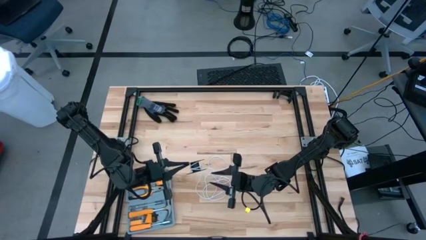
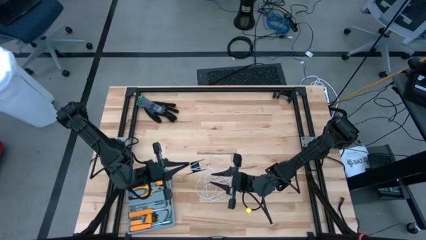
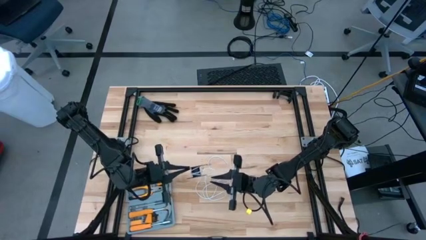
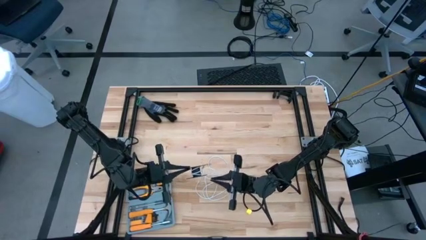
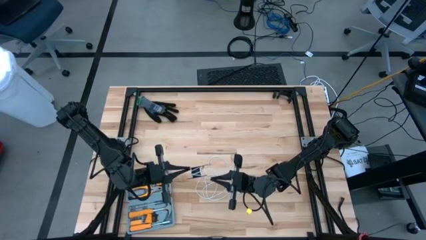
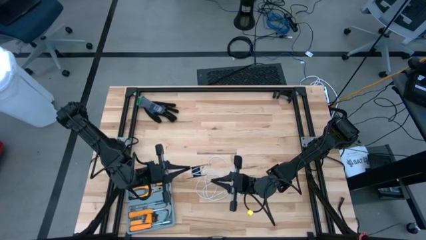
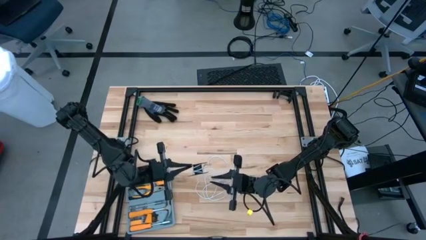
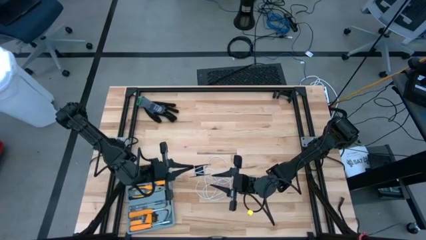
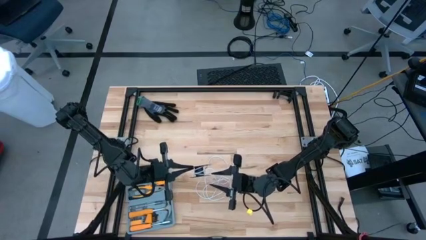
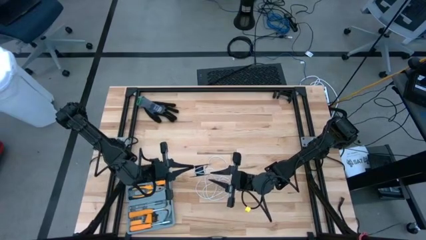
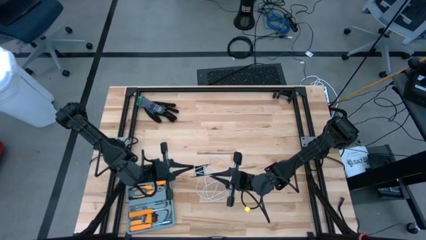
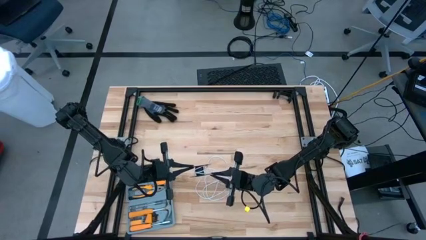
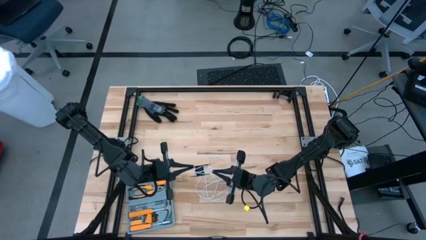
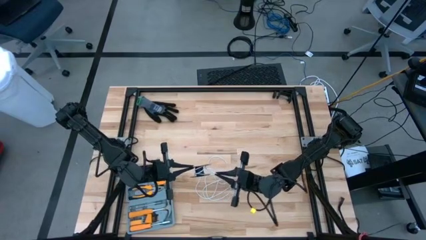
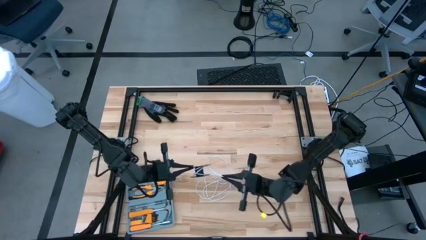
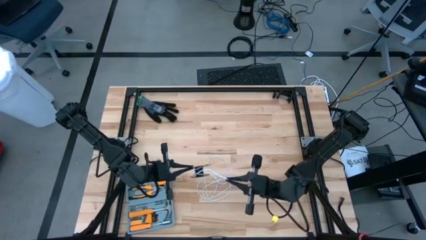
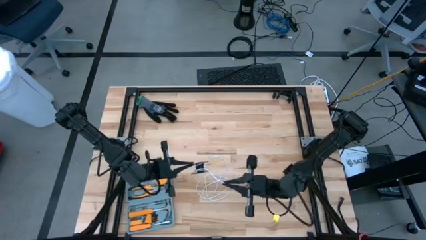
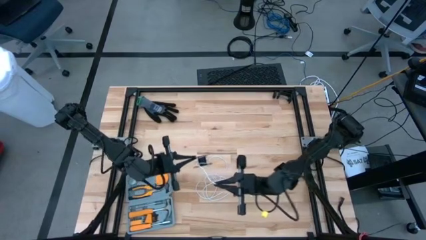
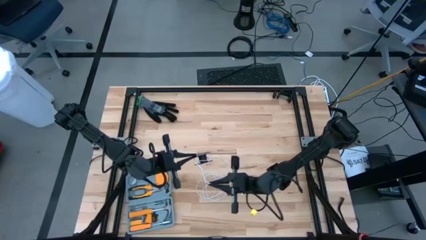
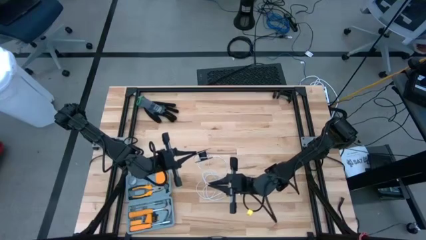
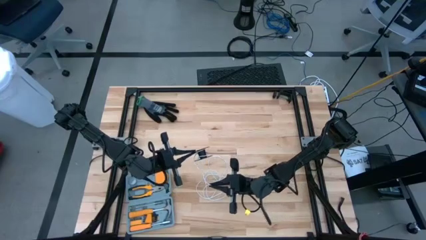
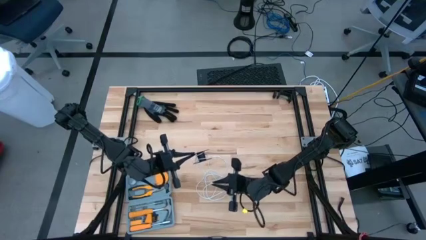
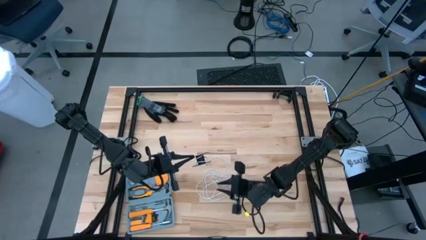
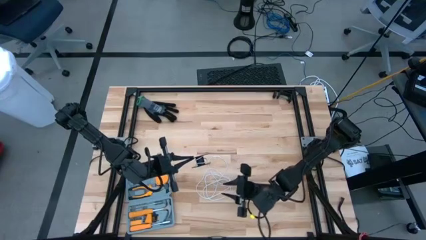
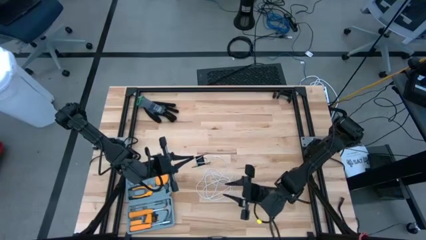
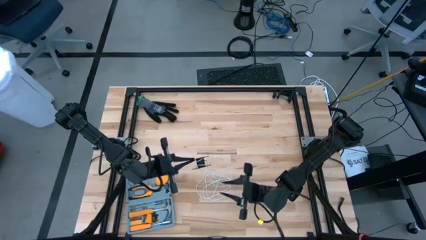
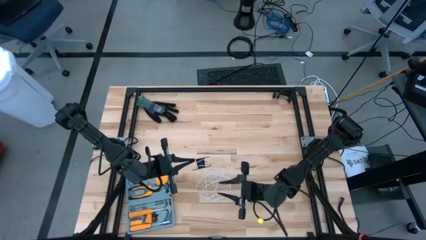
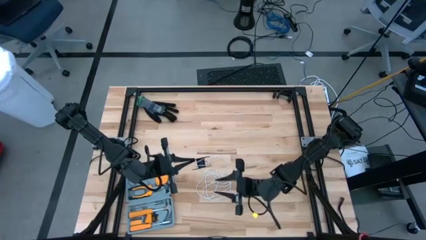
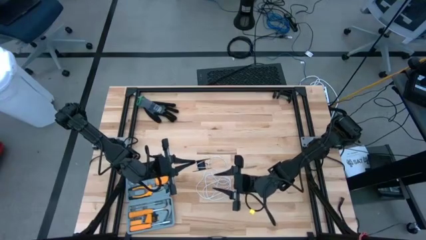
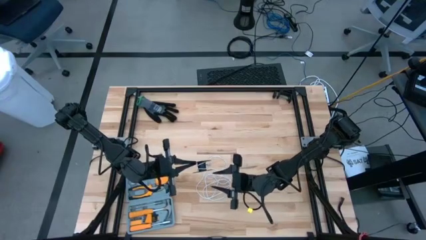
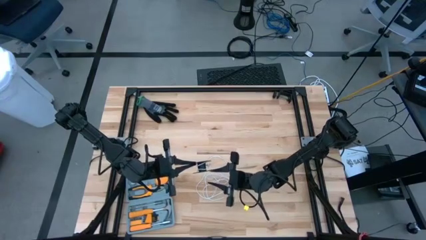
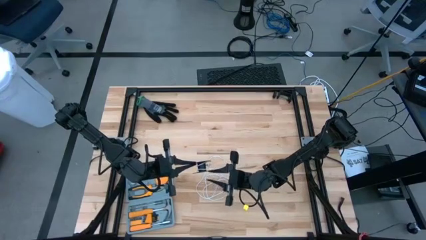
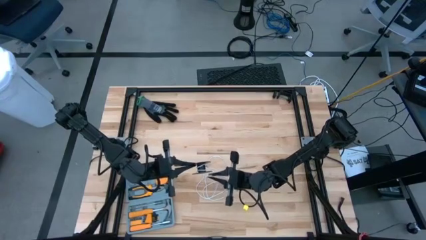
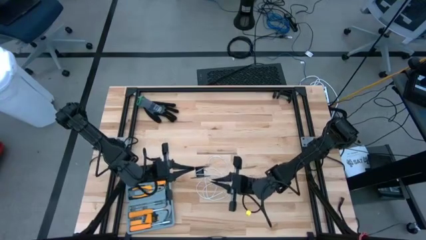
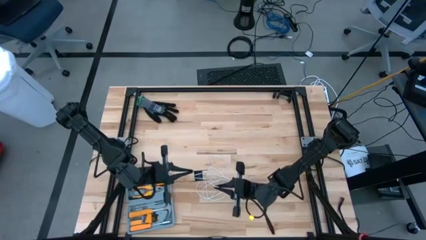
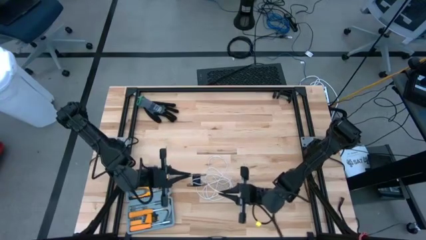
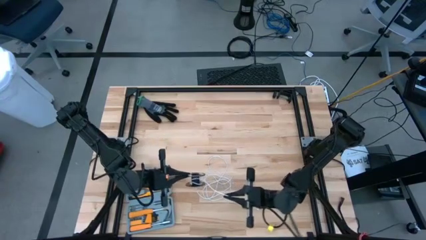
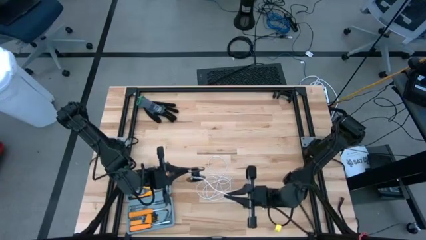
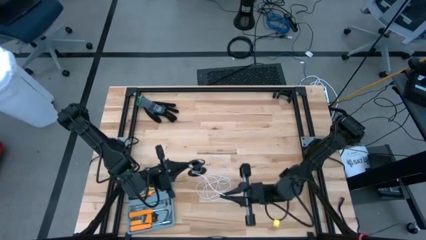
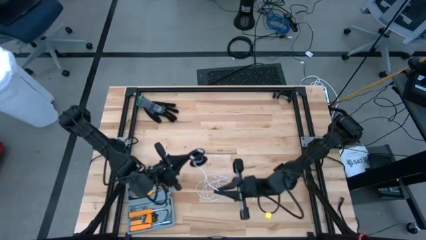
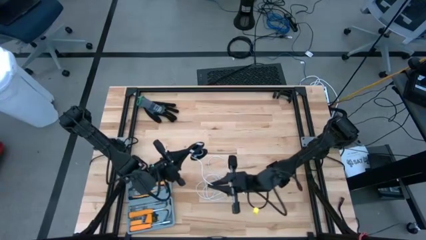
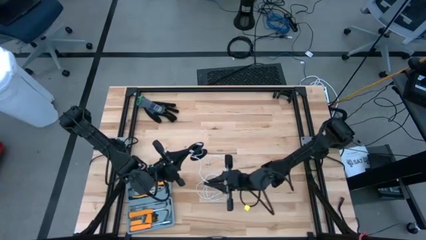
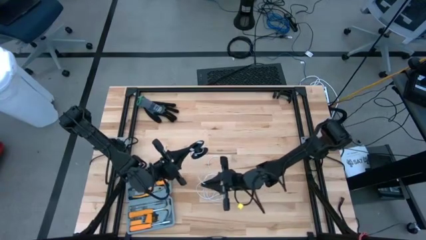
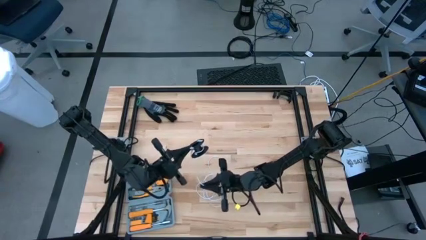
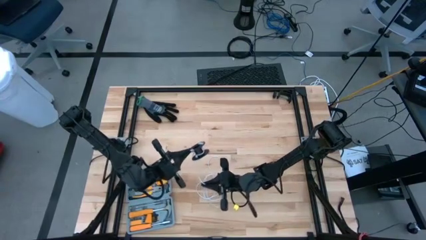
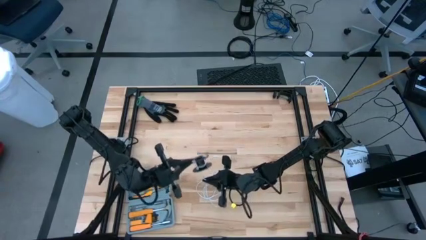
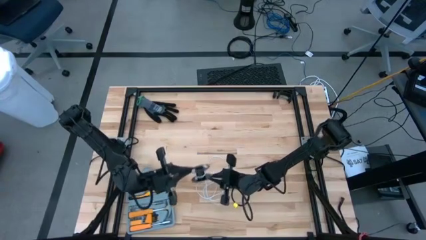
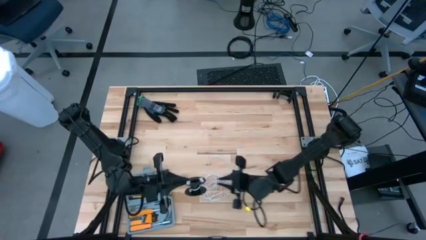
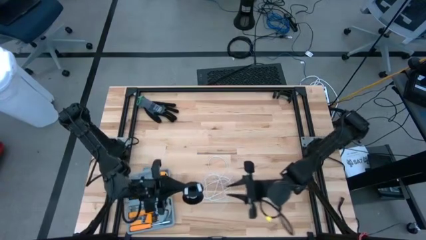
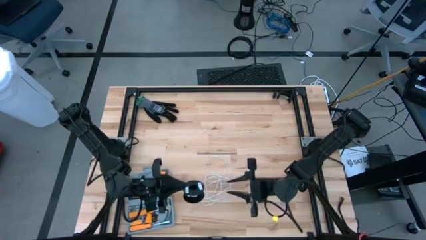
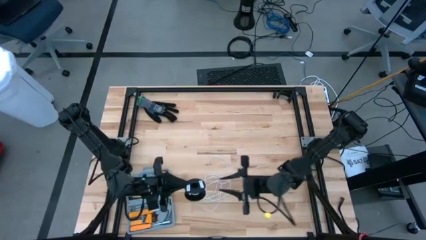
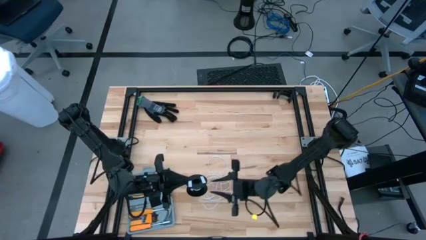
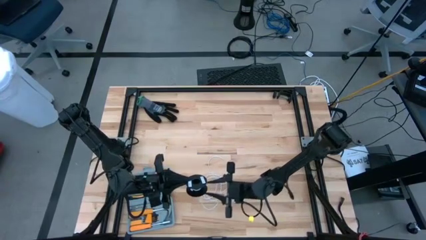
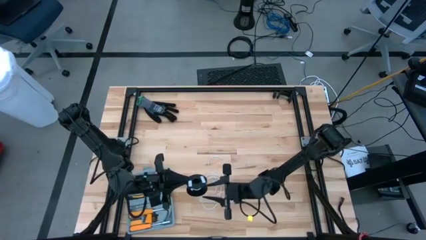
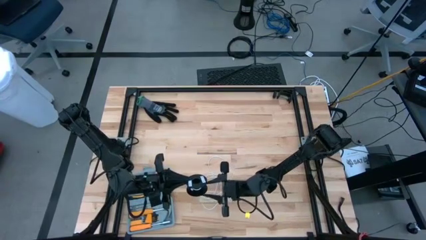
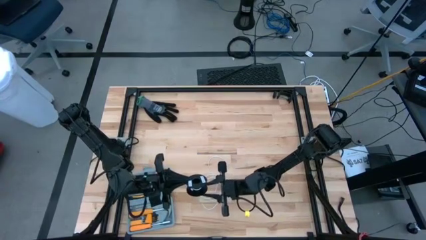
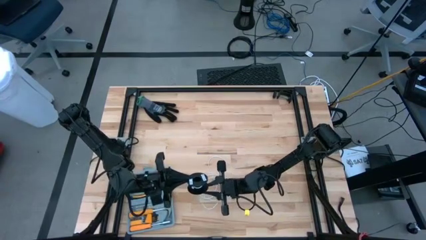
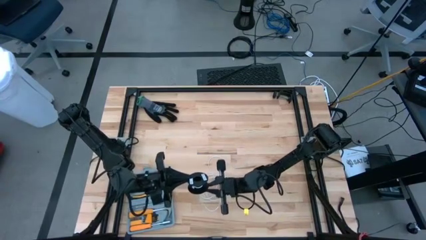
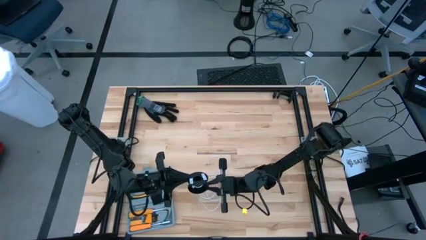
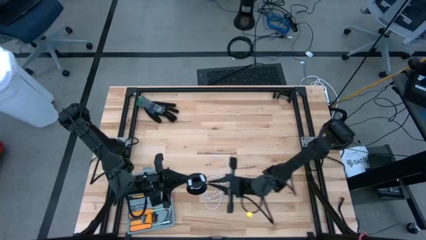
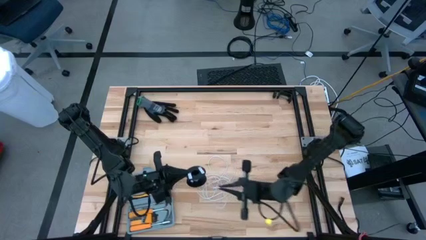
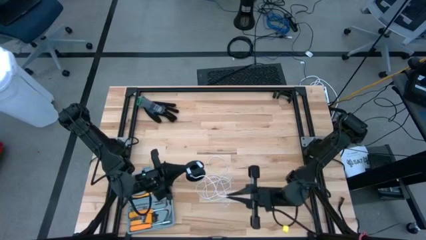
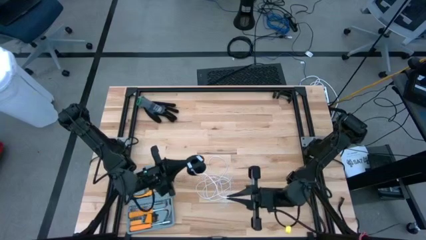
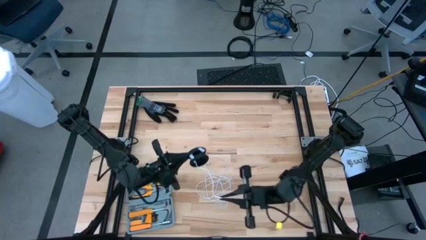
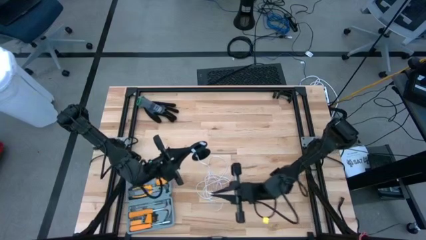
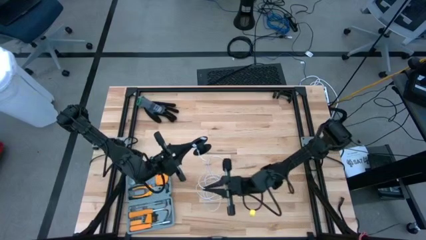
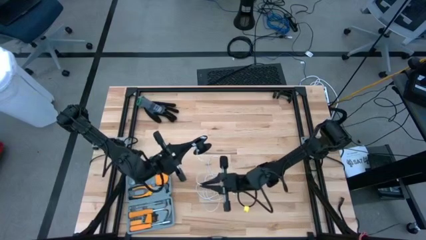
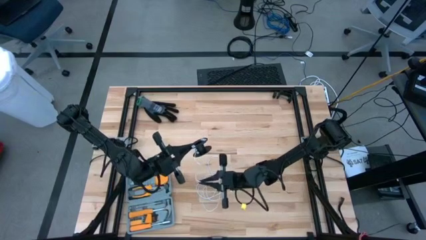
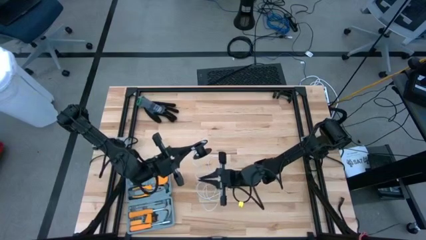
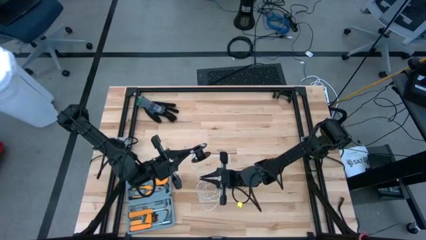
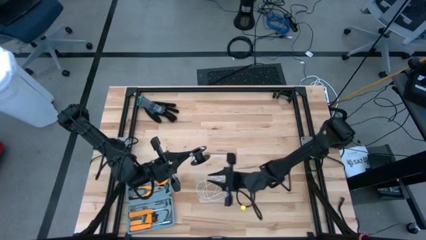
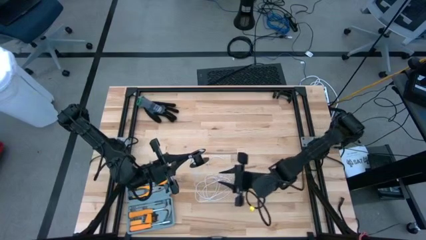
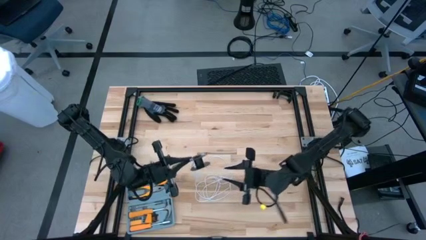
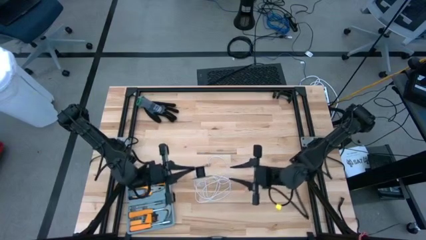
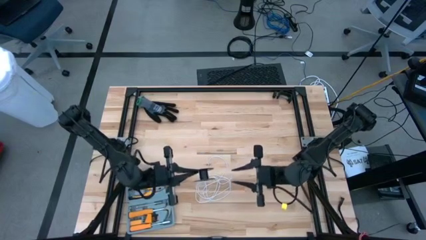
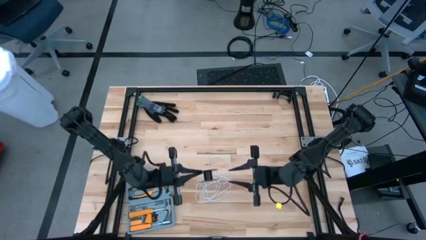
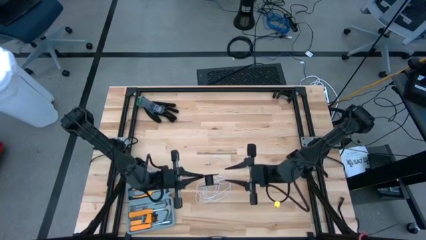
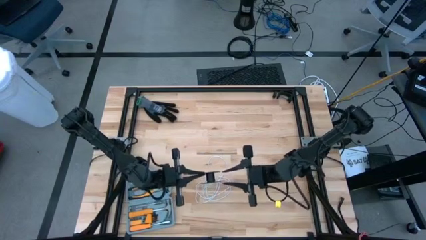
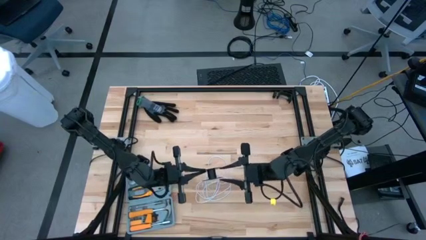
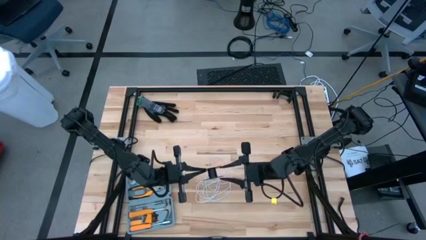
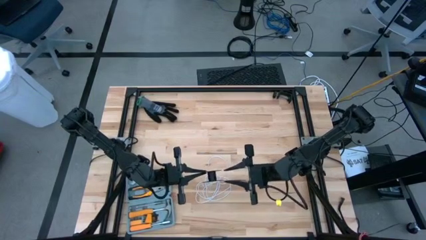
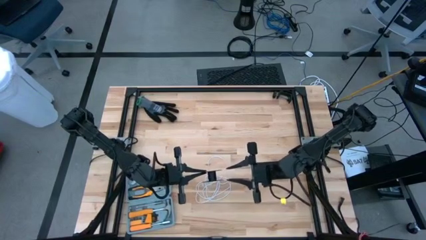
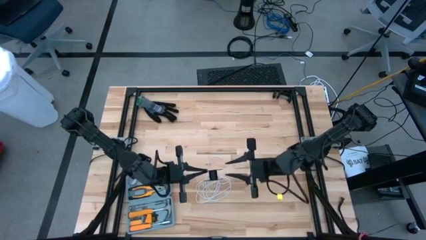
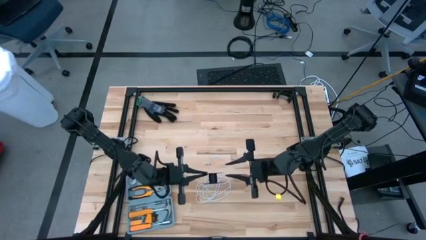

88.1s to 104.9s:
Task: Coil cords
Uncoil the white cable wire from the spool
